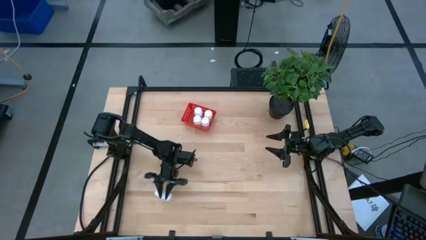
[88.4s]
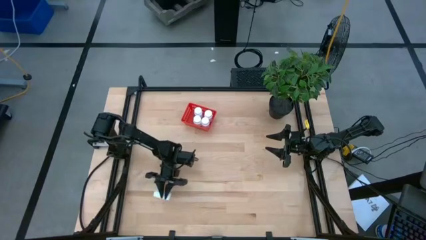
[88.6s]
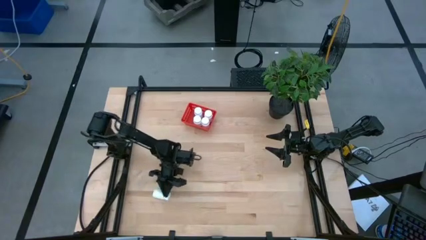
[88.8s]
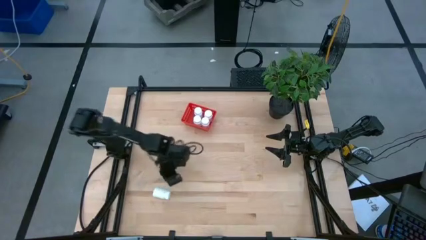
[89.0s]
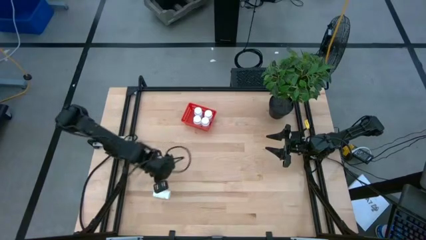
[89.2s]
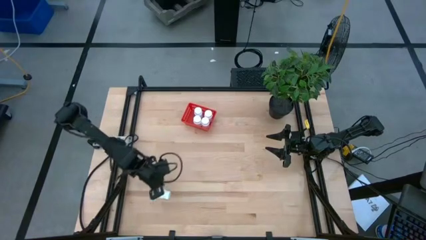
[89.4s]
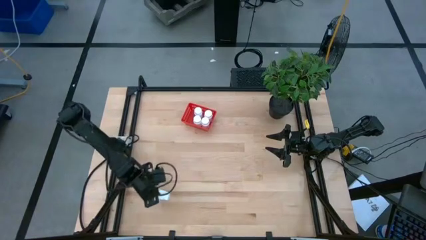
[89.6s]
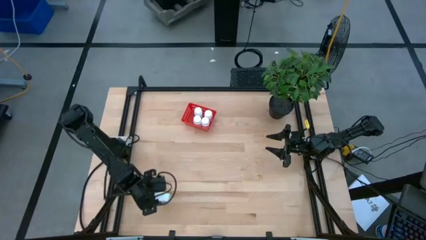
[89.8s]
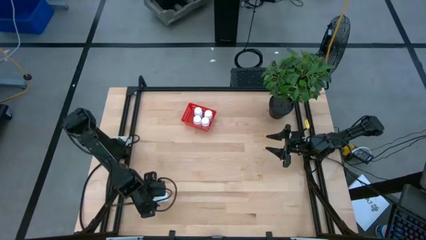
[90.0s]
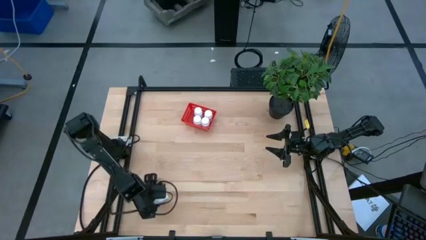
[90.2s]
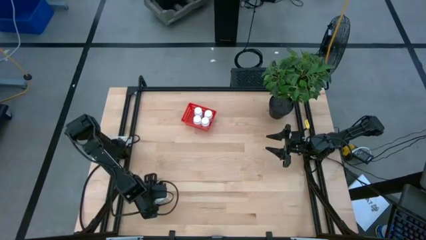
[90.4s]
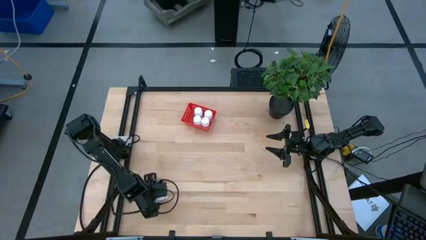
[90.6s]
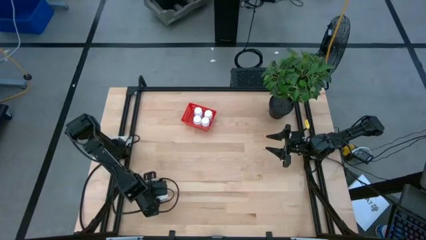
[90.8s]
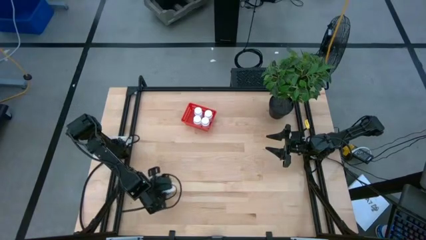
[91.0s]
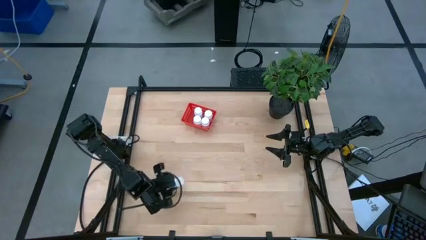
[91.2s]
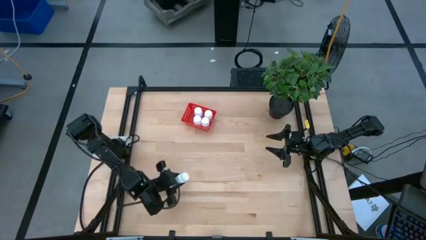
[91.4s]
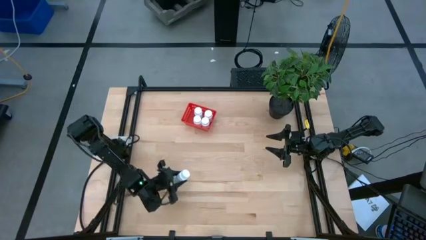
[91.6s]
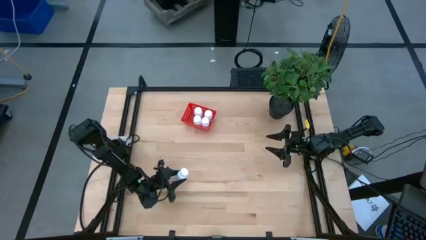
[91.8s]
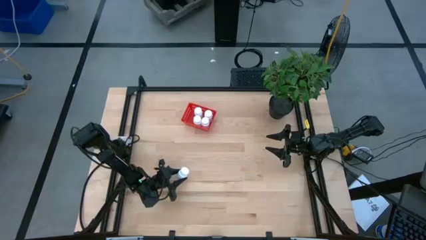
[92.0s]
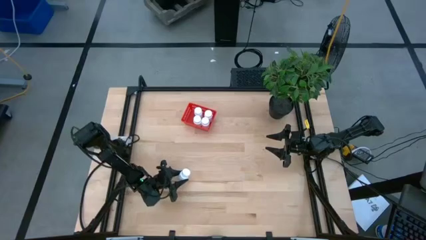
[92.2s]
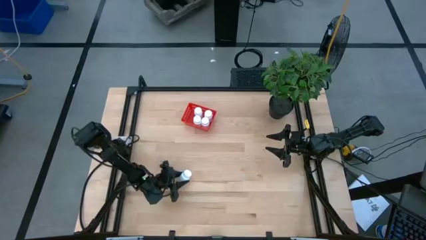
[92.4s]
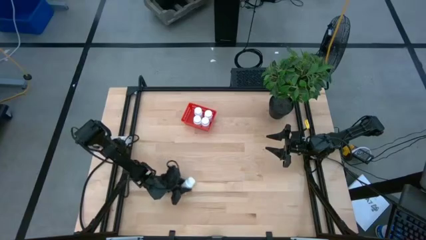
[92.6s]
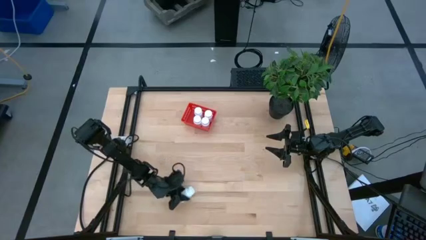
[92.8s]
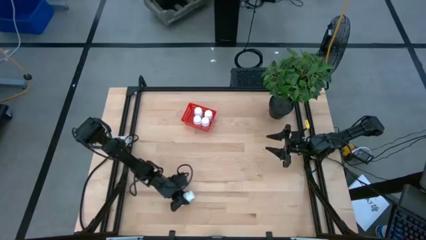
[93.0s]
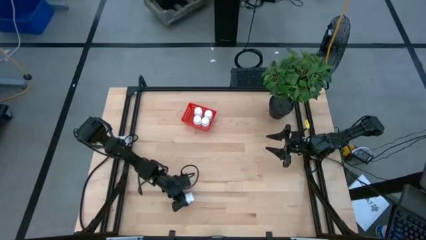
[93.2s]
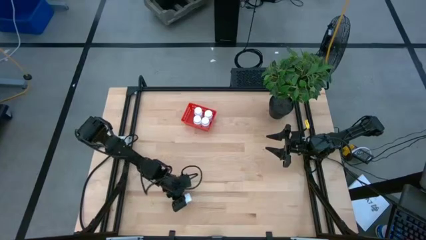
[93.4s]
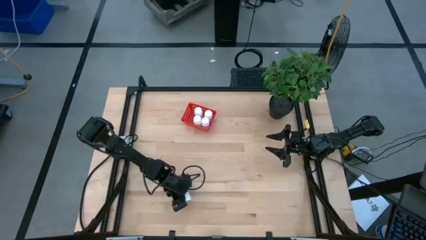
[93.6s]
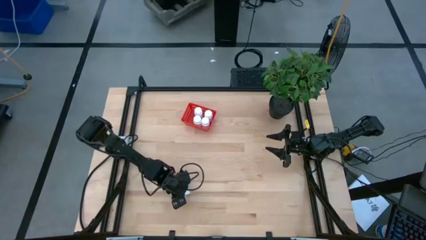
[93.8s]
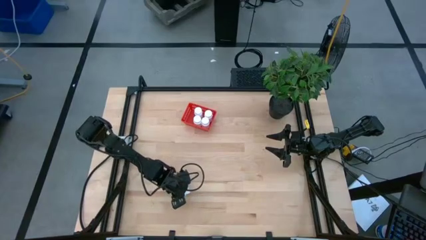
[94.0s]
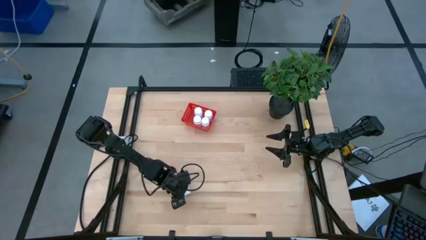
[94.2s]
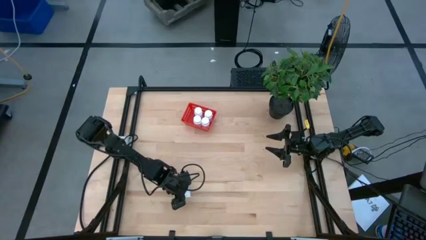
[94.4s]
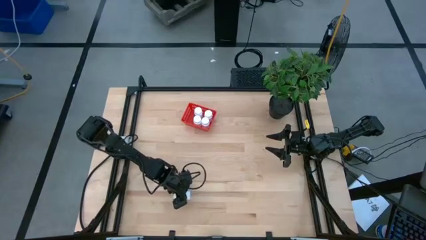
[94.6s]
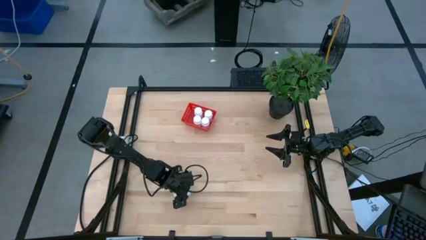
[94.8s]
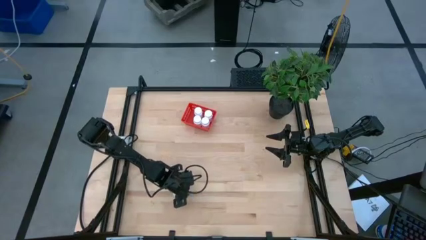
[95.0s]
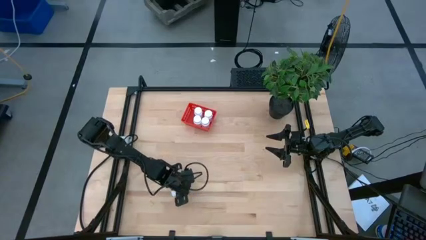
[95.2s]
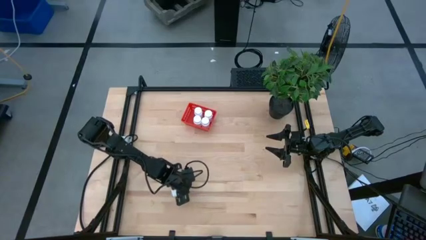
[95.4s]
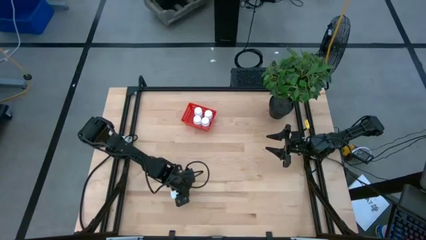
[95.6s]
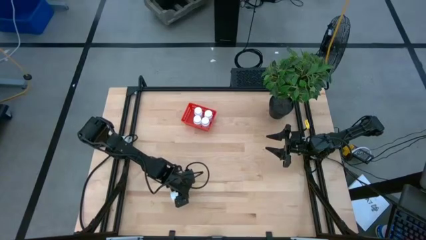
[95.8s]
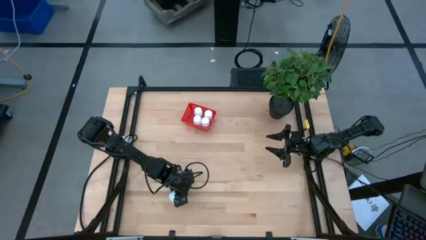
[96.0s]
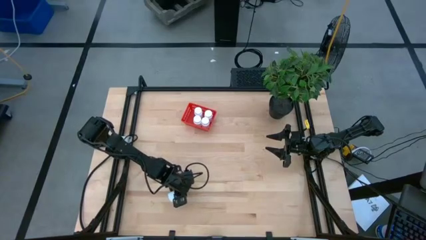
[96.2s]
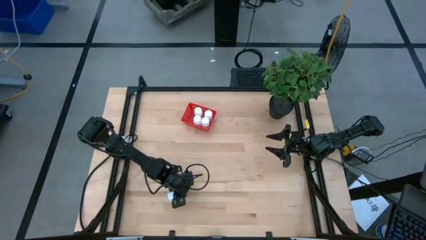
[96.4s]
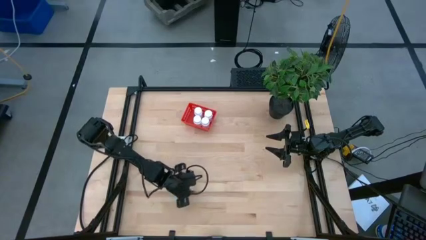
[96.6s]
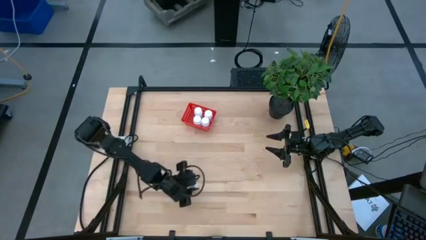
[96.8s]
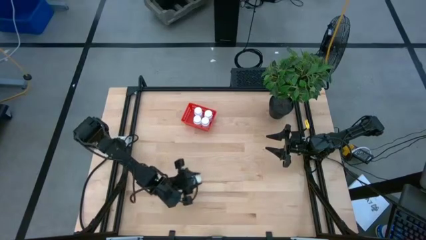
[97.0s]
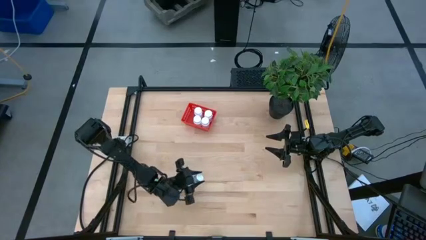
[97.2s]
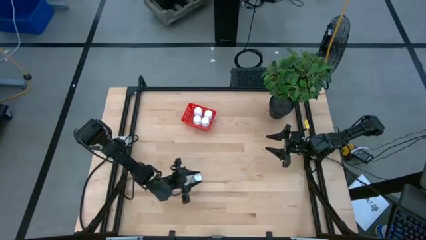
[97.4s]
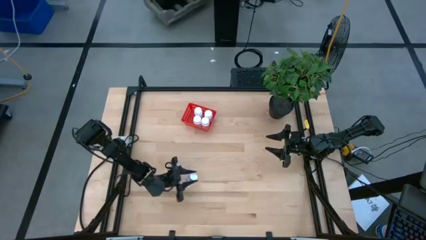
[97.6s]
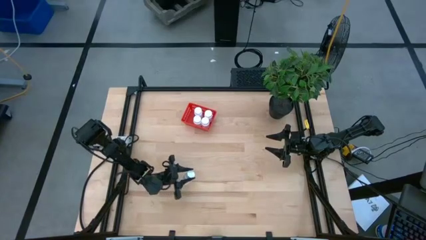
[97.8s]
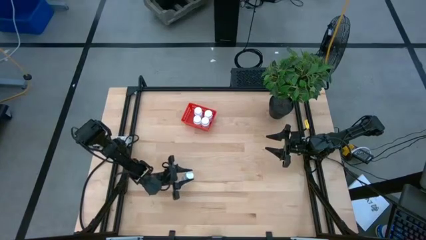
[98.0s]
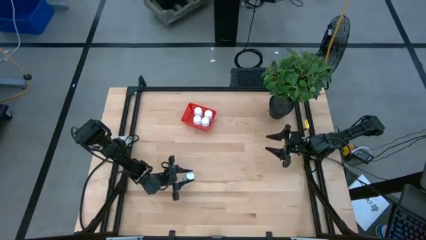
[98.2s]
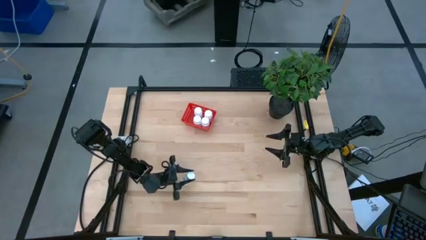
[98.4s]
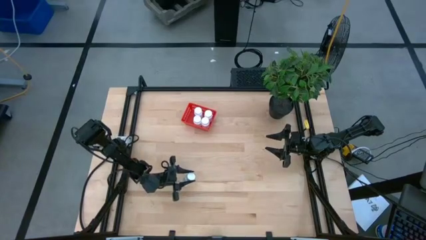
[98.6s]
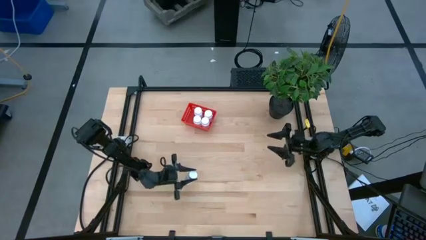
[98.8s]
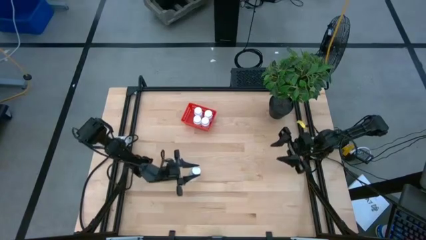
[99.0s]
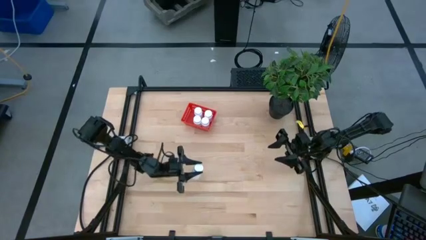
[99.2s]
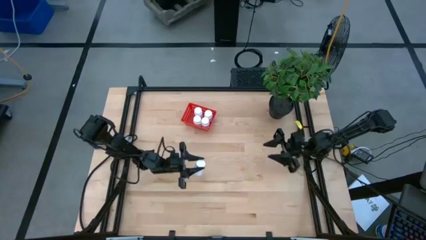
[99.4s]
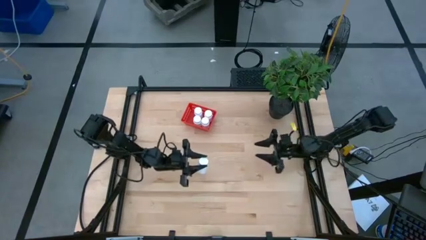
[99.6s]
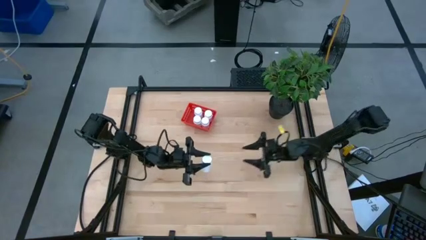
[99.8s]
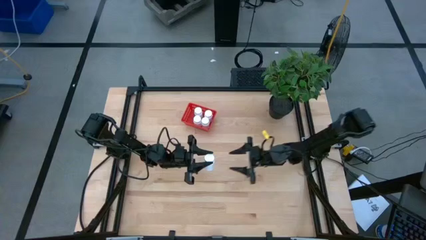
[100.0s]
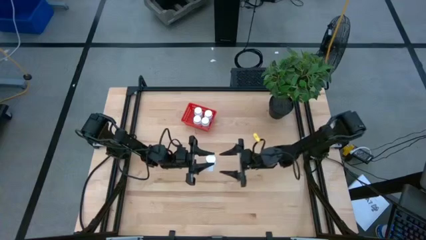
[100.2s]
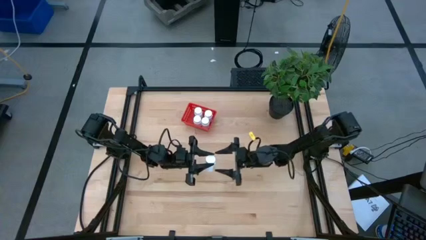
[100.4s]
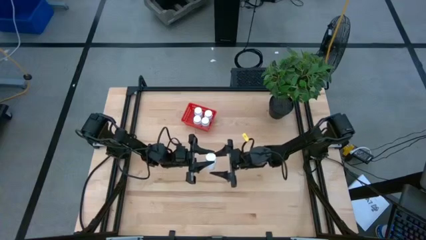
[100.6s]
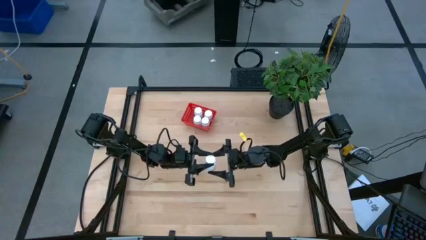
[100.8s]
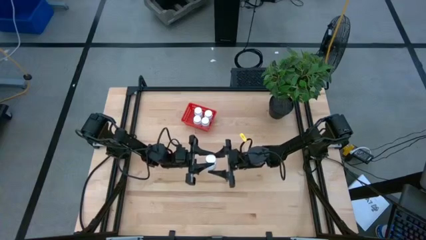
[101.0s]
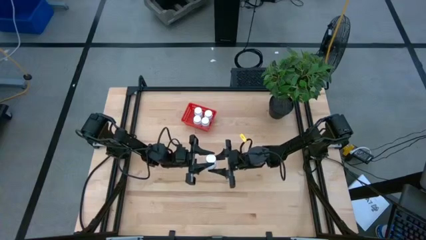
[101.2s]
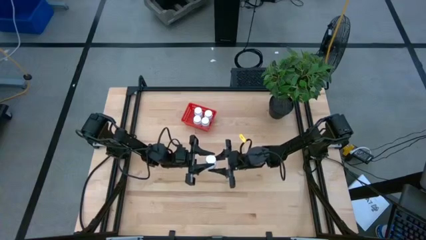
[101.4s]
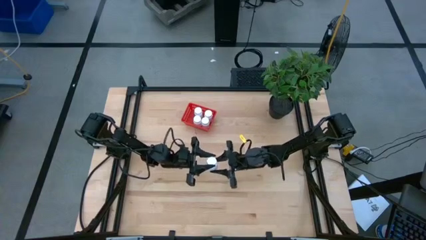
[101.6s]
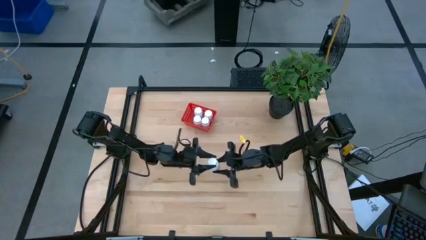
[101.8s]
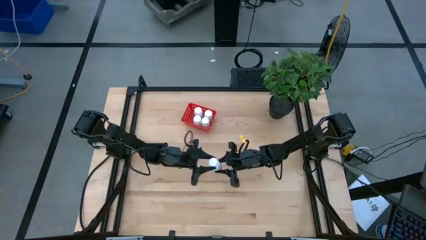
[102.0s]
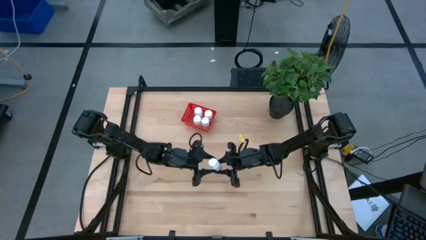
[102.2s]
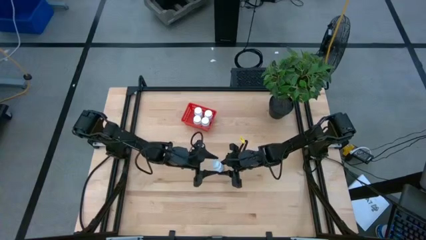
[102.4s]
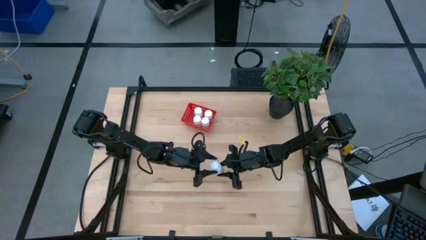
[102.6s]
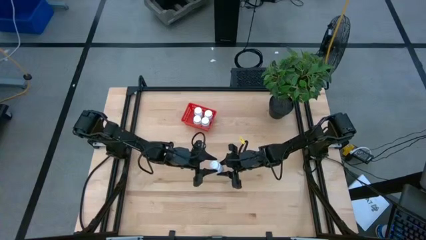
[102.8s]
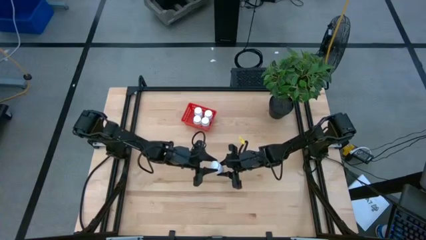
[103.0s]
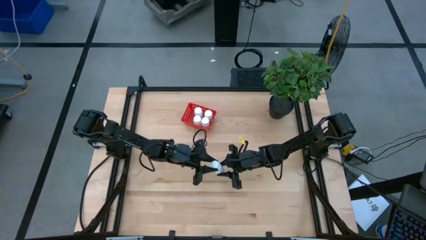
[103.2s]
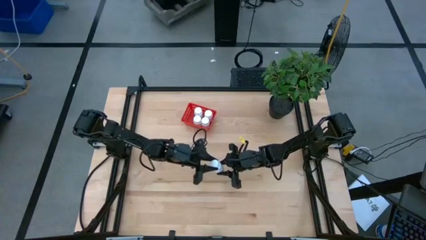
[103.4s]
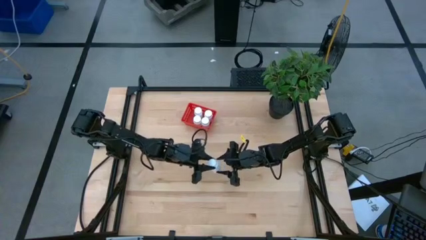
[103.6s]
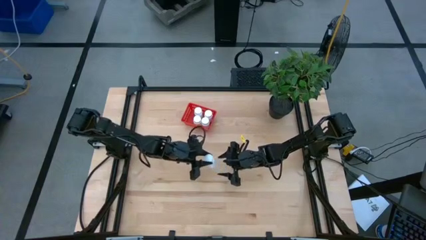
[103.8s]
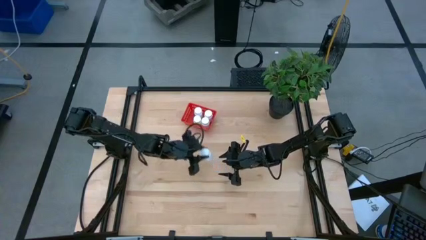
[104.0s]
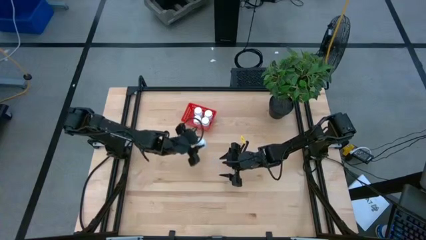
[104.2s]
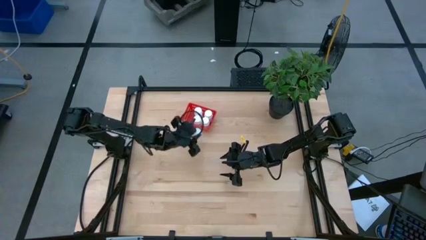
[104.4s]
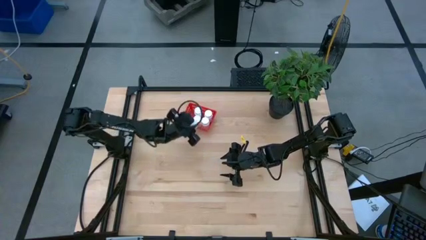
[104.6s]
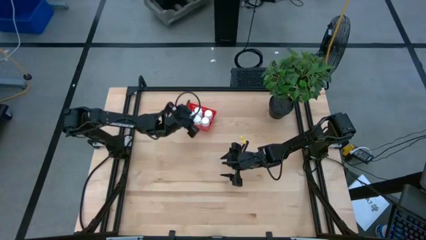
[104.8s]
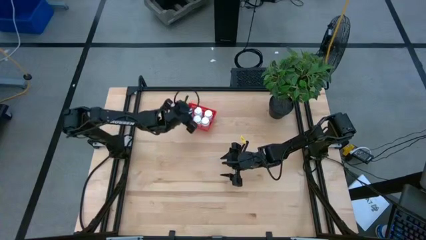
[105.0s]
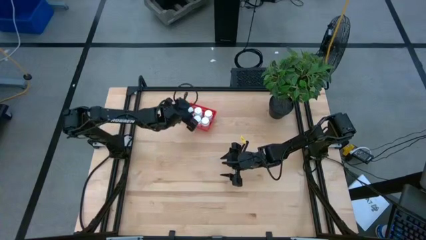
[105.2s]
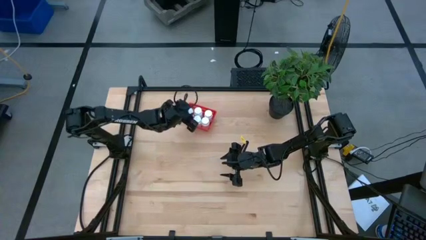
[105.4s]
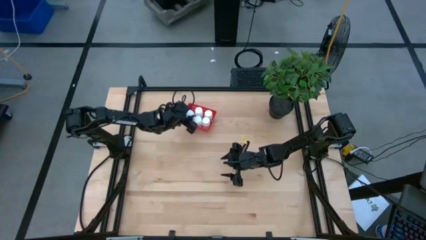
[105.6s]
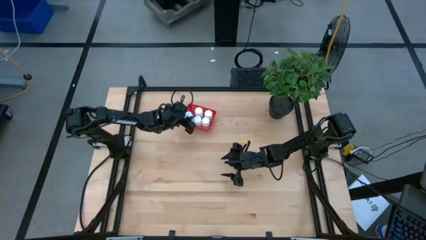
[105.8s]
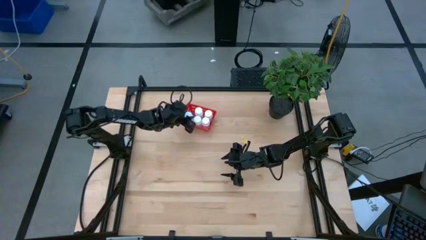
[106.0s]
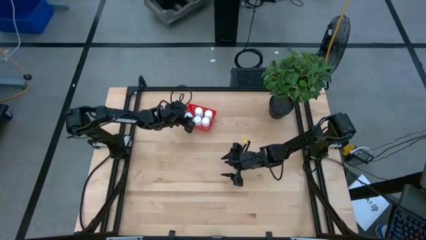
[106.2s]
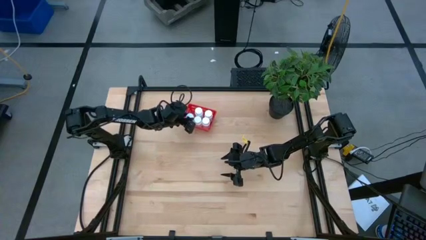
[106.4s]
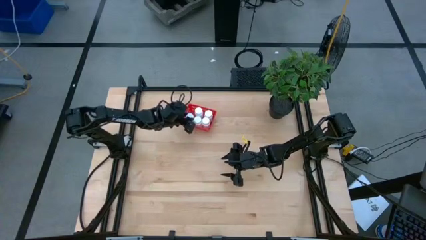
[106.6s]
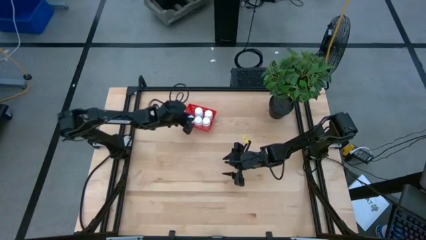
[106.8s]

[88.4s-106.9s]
Task: Pick and place pill bottles into a basket
Put the white pill bottle into the orange basket
